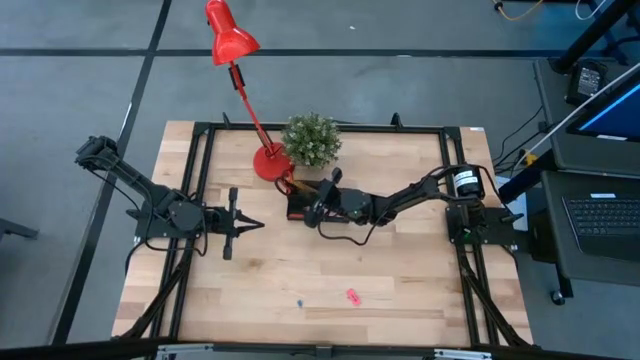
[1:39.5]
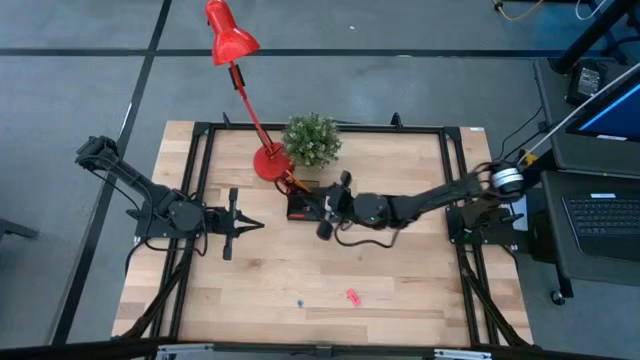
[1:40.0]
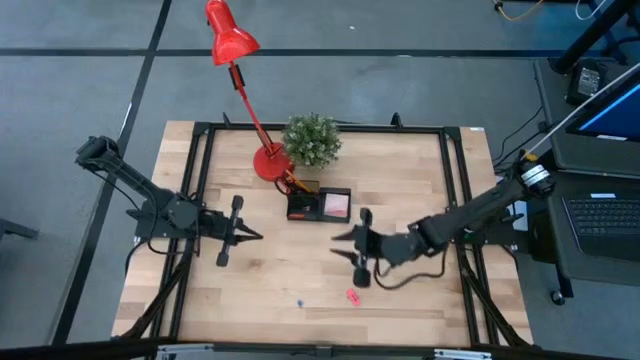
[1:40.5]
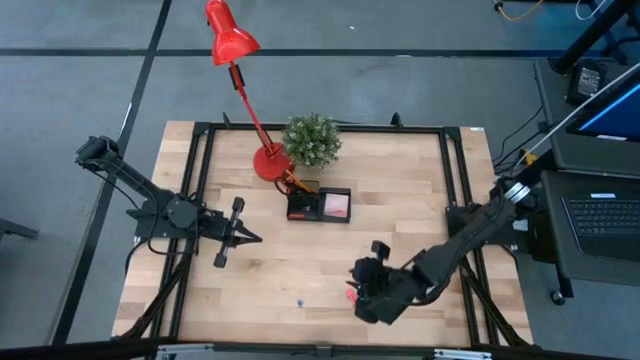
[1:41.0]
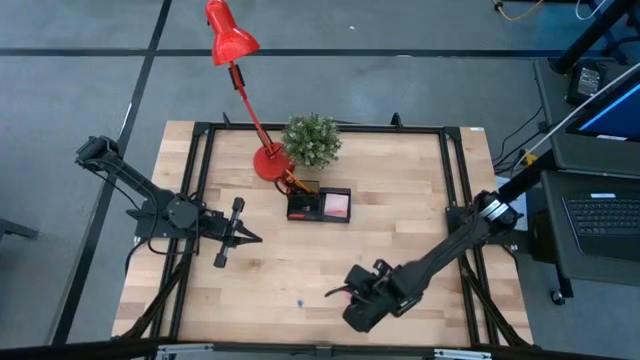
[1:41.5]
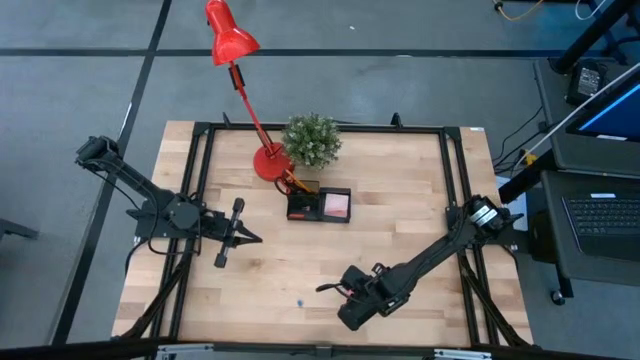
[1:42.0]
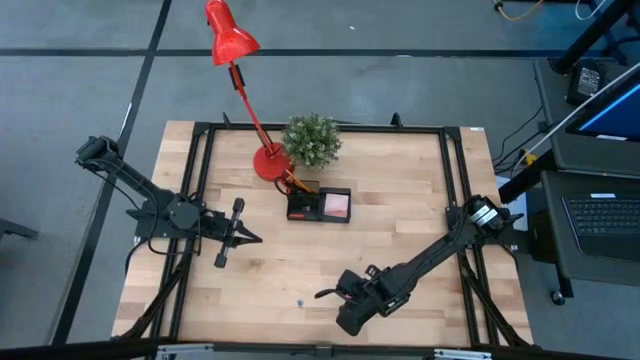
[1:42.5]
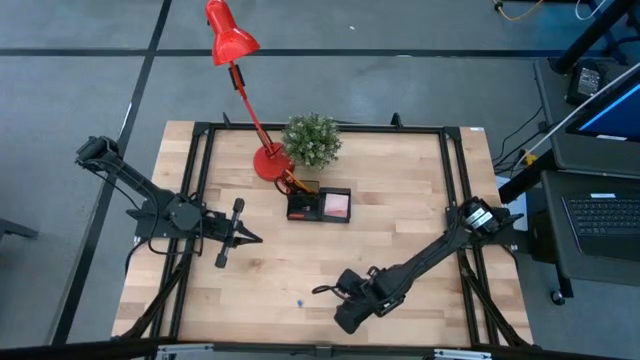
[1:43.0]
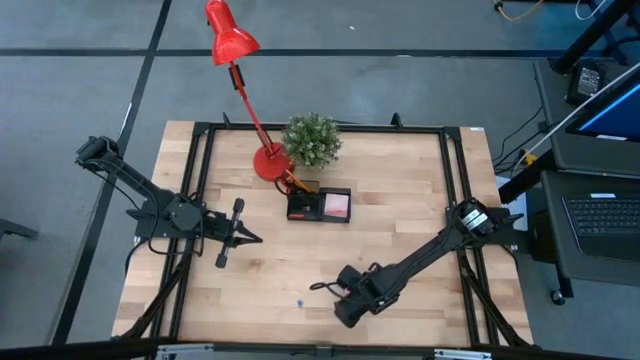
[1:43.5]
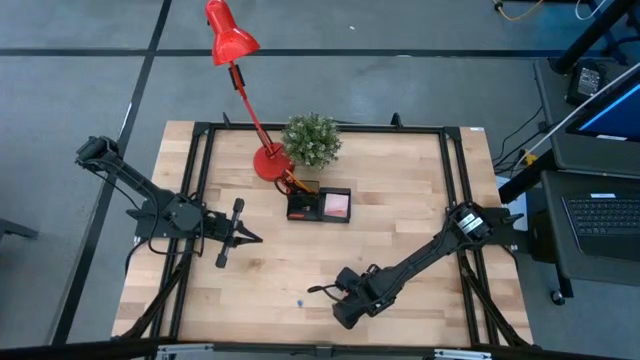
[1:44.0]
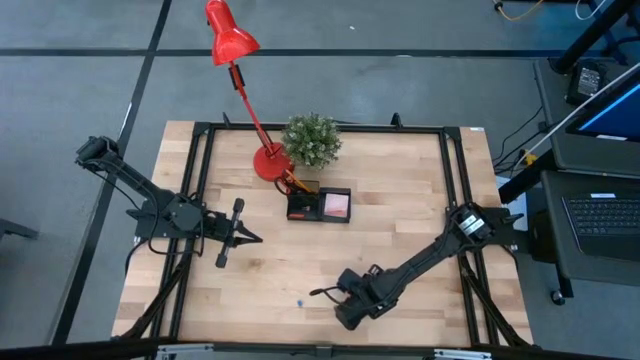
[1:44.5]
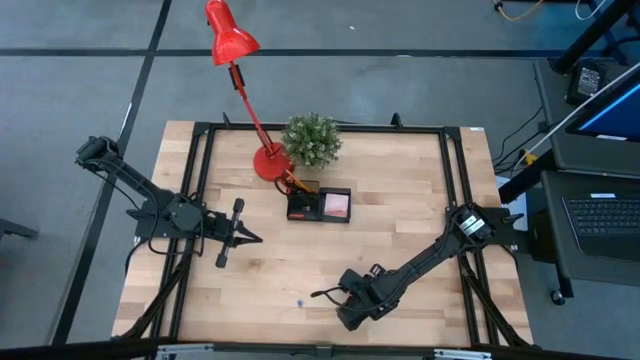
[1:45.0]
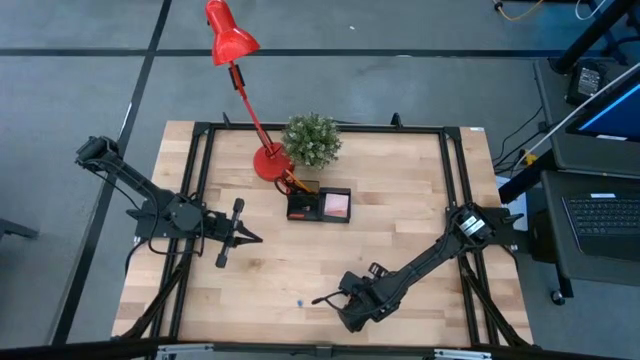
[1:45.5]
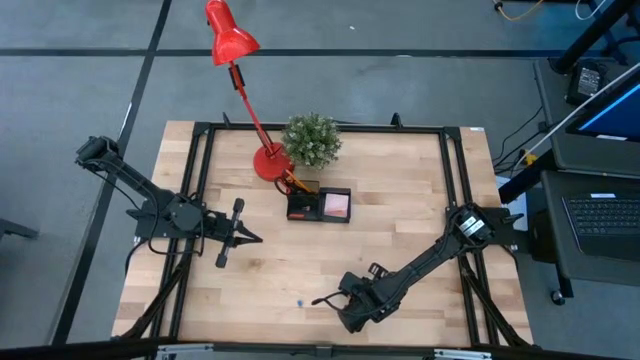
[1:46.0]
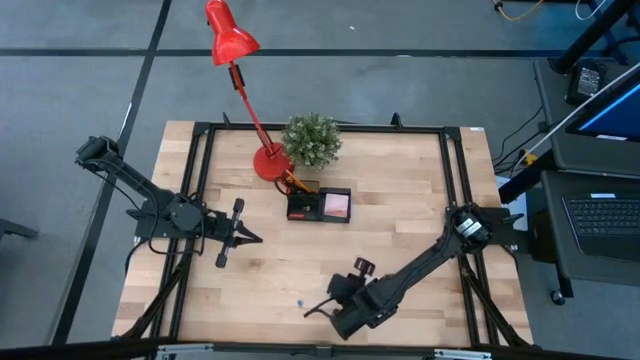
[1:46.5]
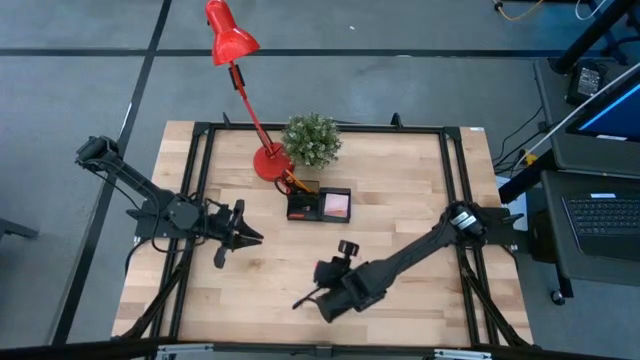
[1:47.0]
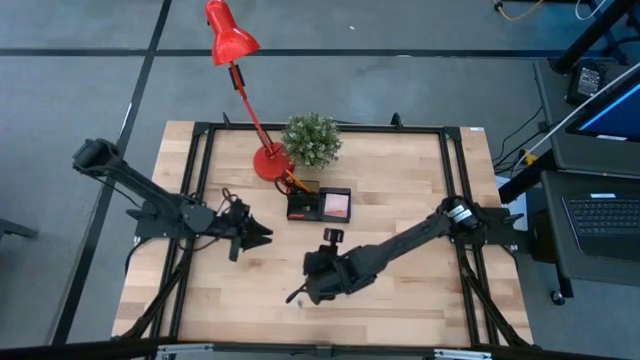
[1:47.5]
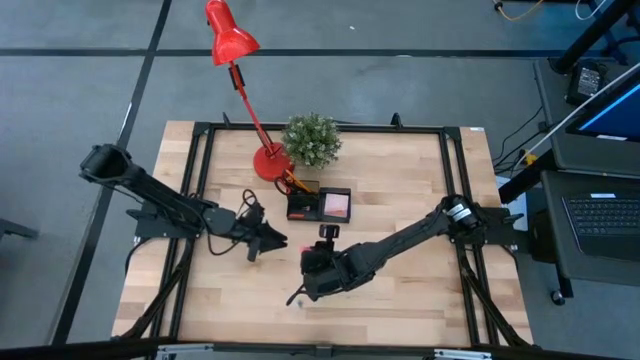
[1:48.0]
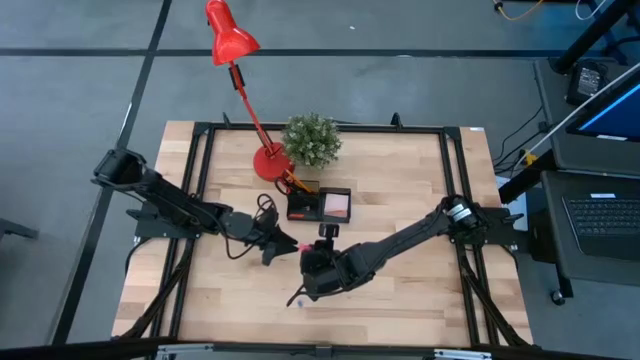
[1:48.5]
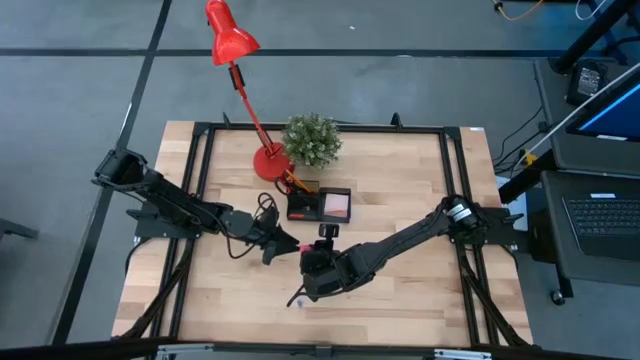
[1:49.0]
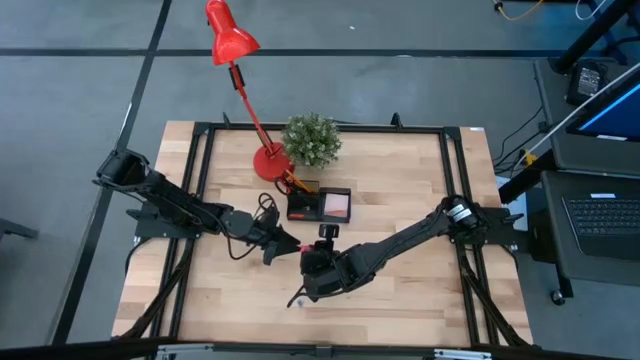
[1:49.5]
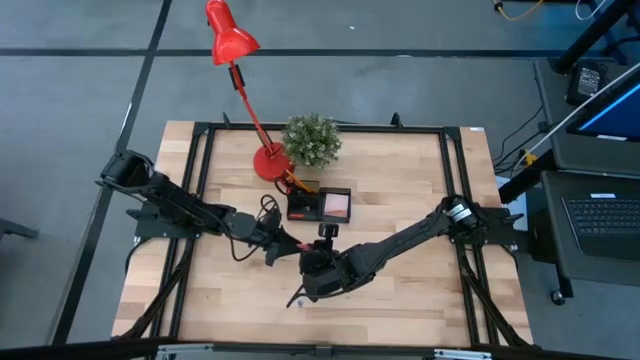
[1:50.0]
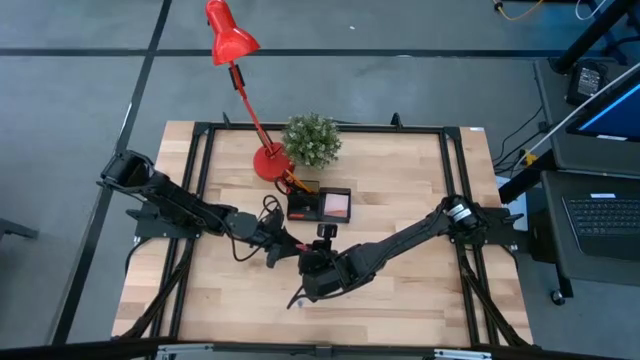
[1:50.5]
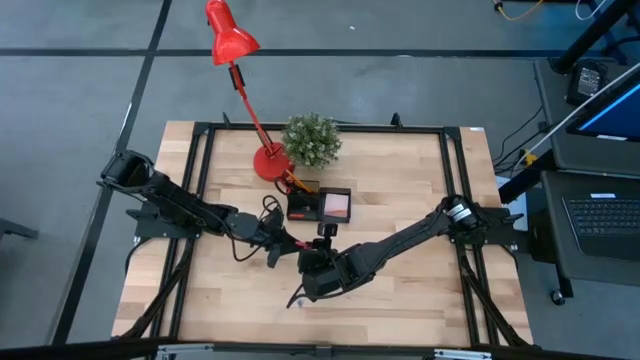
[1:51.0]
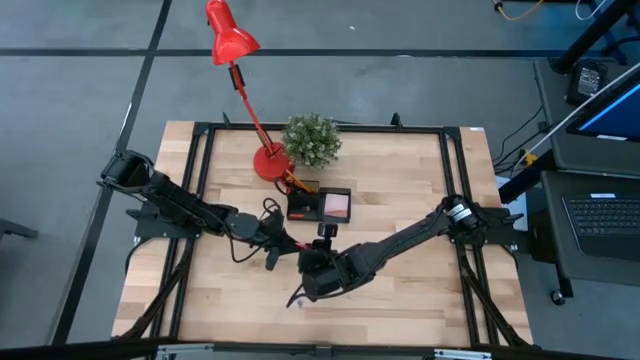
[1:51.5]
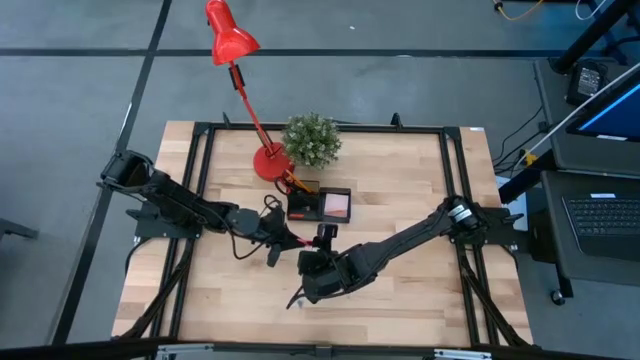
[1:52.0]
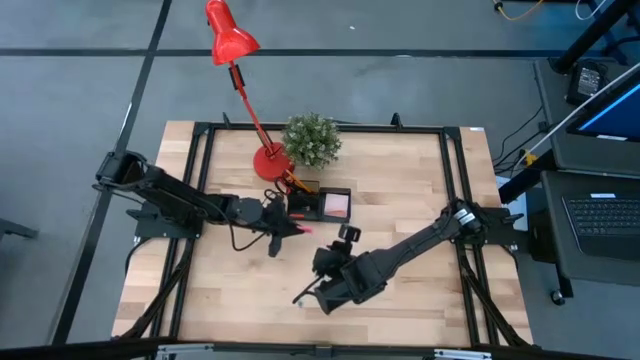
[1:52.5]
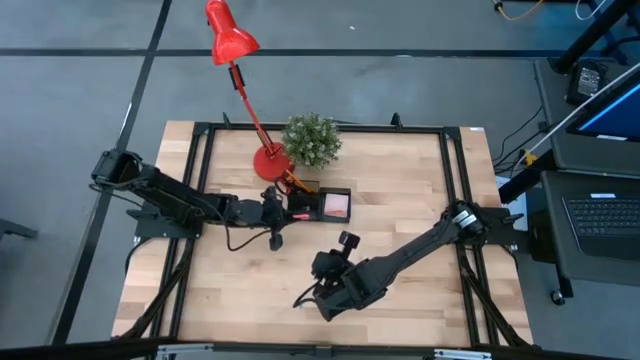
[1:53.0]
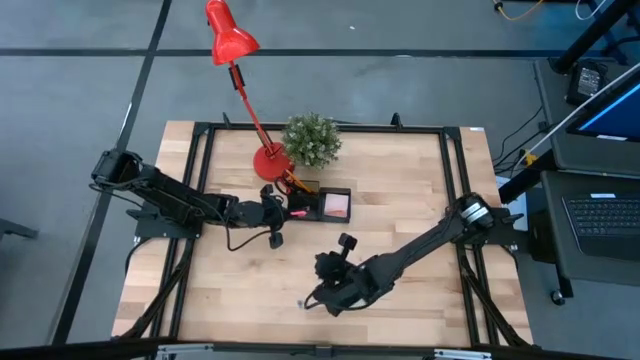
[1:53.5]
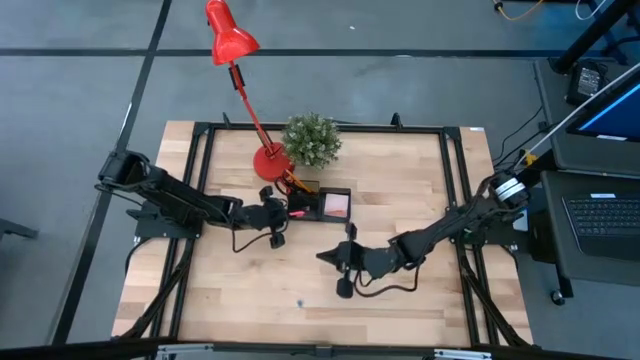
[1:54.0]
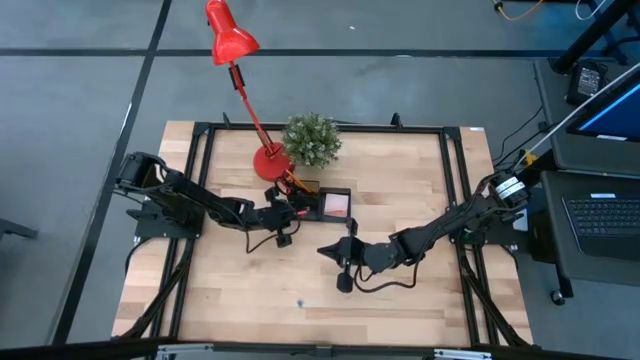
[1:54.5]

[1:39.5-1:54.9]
Task: Pick and place office supplies into organizer
Put the pink eraser into the black desk organizer

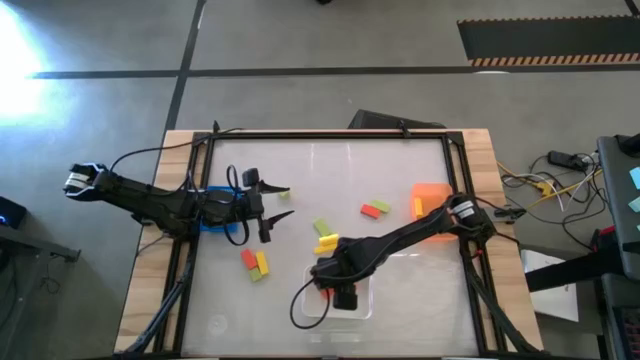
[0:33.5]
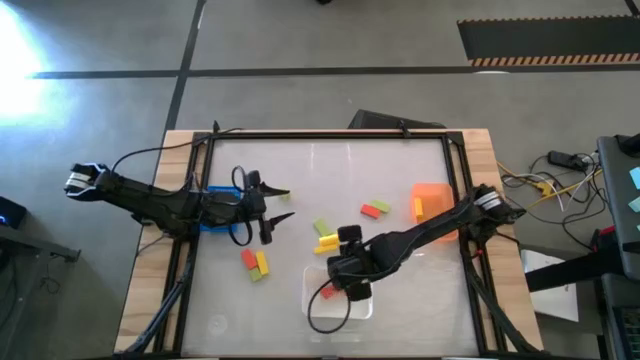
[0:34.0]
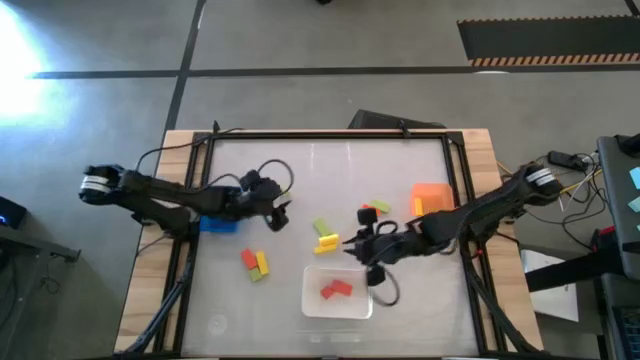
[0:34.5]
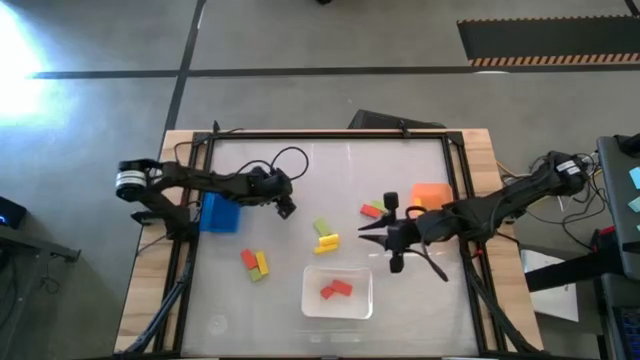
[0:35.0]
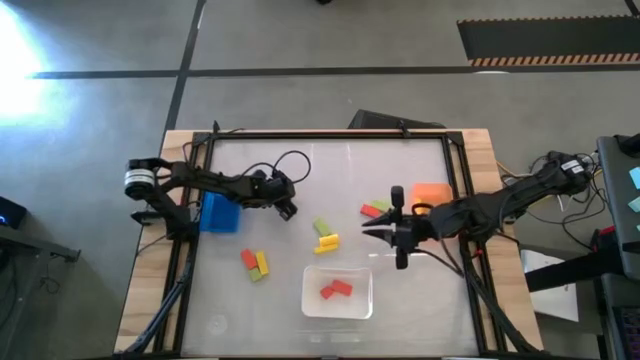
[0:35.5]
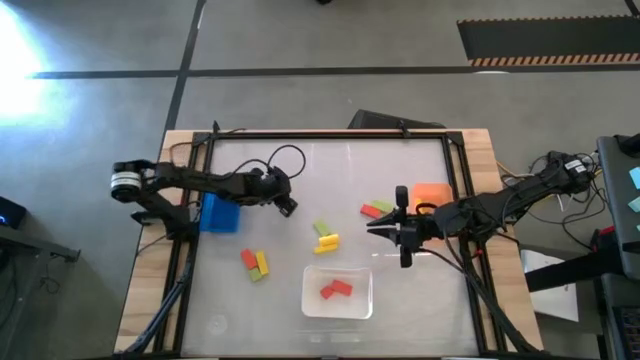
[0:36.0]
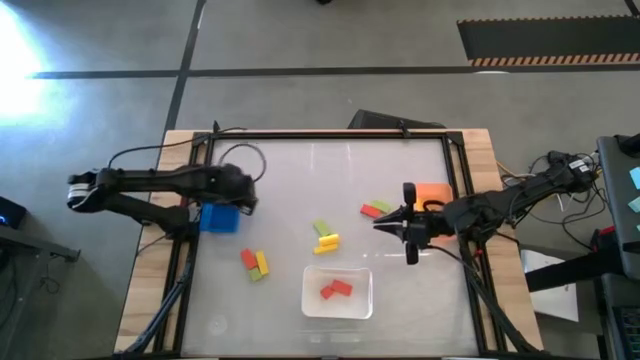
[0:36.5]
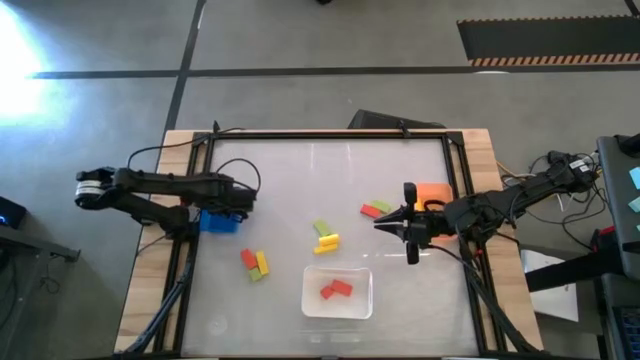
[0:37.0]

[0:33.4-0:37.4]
Task: Sort & place blocks by color
Put the green block into the blue bin
